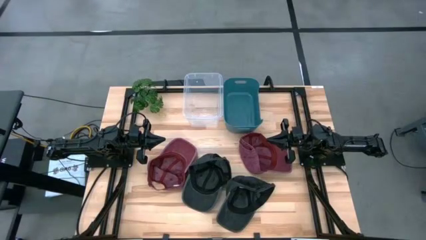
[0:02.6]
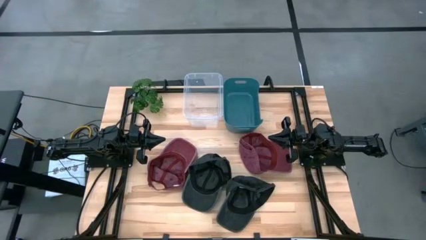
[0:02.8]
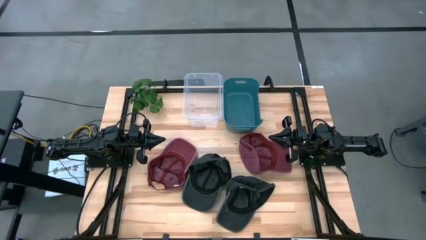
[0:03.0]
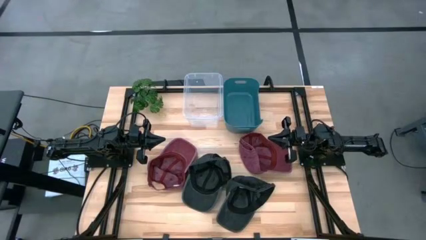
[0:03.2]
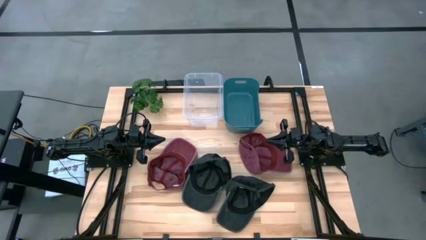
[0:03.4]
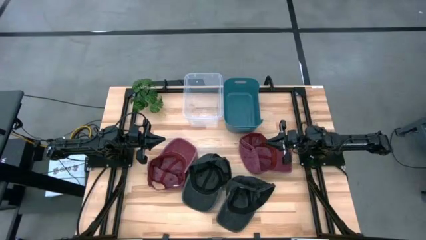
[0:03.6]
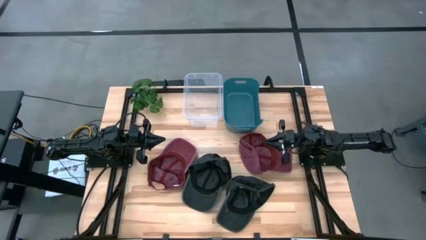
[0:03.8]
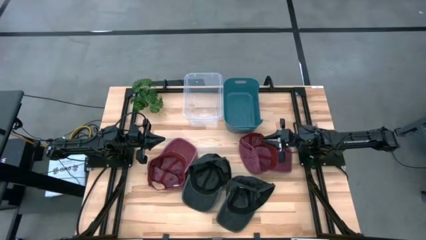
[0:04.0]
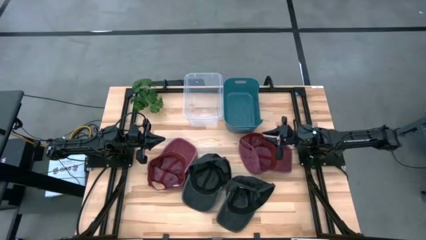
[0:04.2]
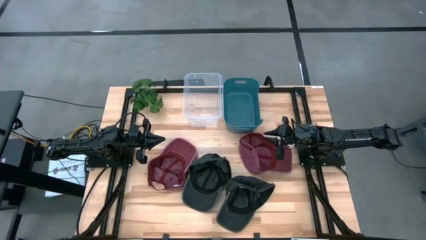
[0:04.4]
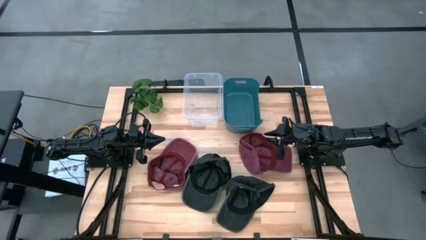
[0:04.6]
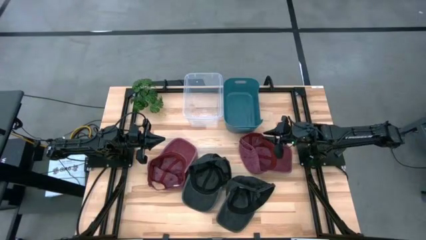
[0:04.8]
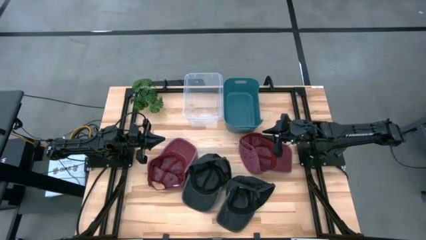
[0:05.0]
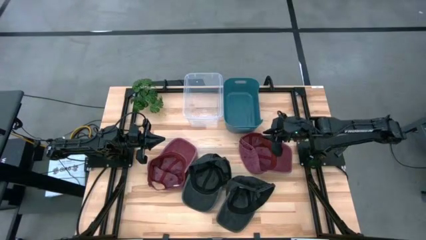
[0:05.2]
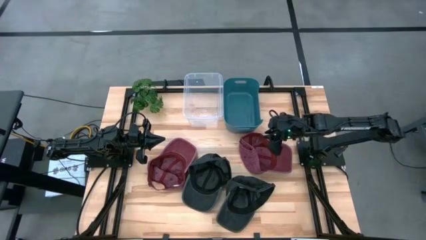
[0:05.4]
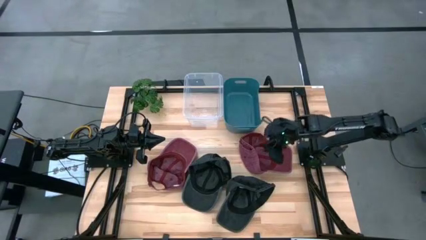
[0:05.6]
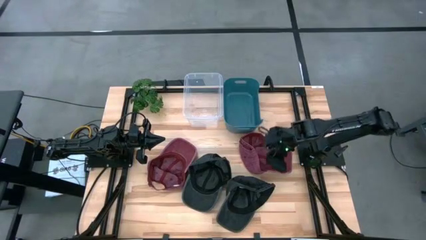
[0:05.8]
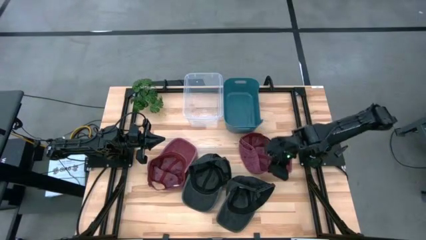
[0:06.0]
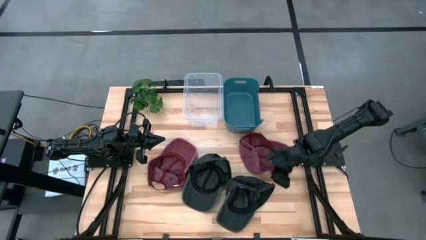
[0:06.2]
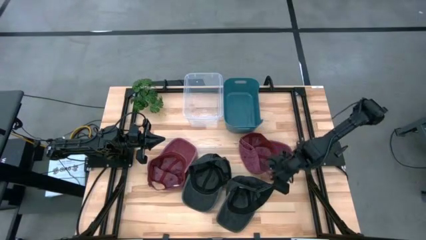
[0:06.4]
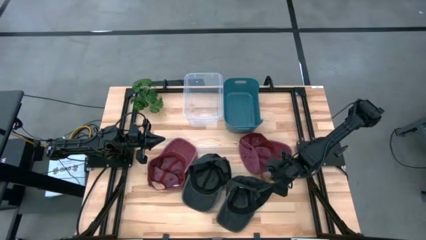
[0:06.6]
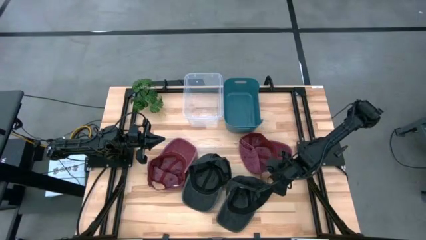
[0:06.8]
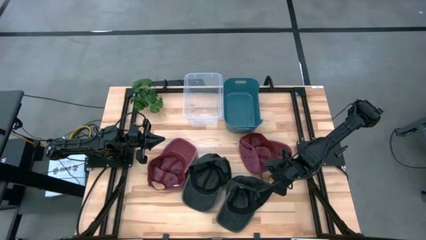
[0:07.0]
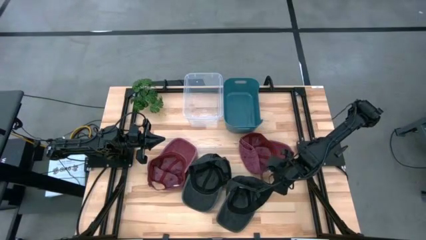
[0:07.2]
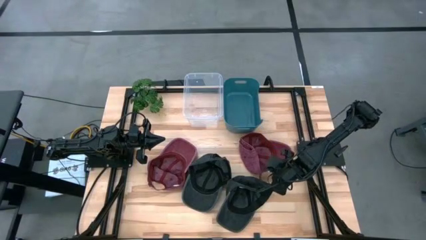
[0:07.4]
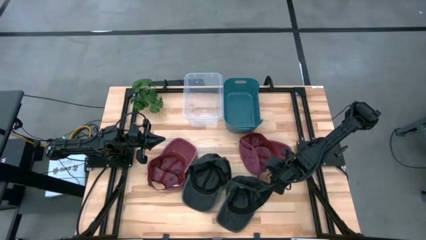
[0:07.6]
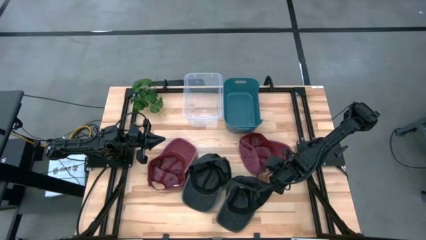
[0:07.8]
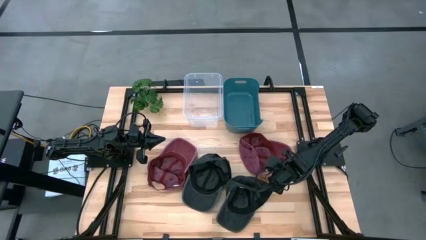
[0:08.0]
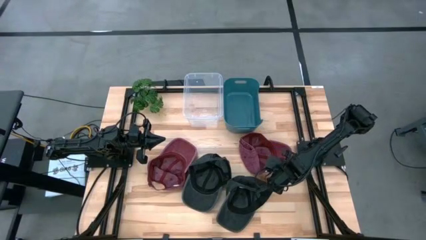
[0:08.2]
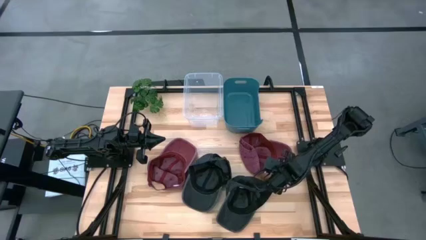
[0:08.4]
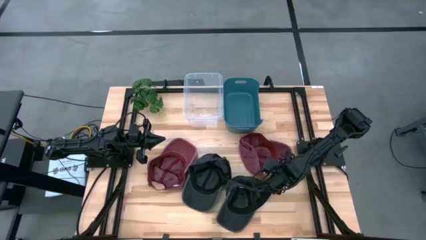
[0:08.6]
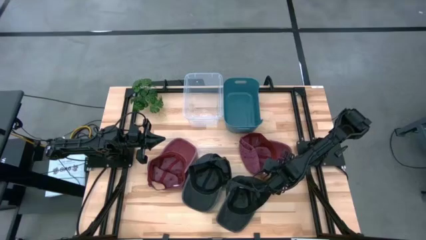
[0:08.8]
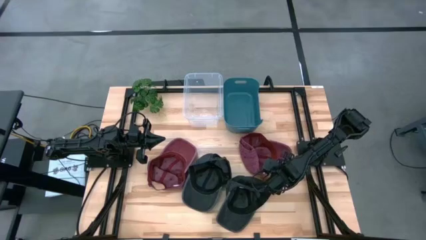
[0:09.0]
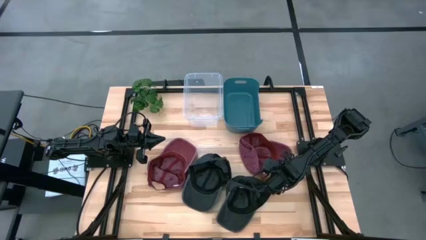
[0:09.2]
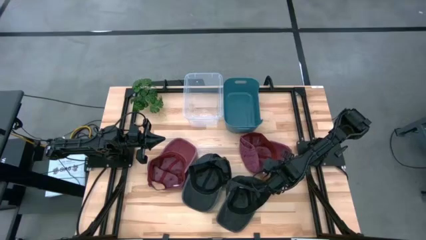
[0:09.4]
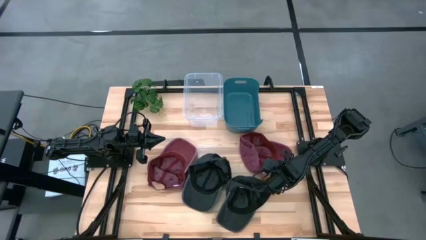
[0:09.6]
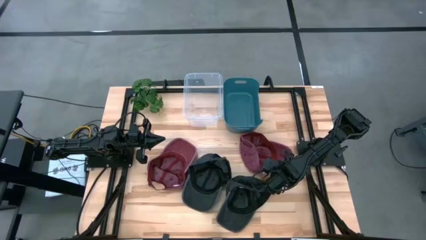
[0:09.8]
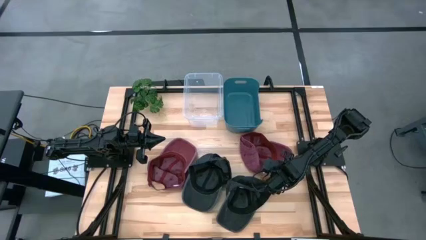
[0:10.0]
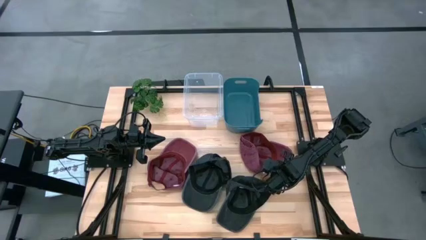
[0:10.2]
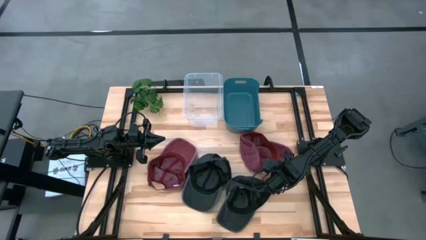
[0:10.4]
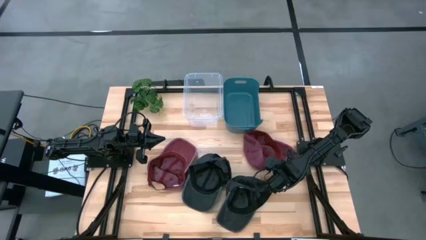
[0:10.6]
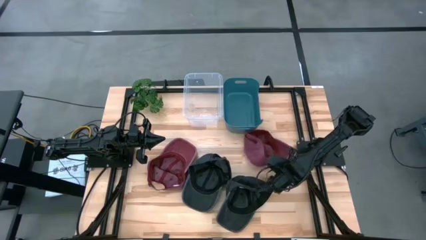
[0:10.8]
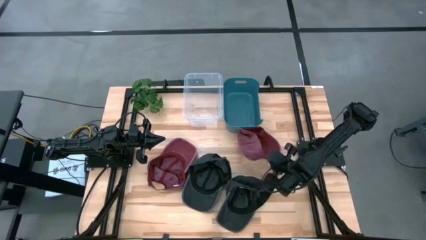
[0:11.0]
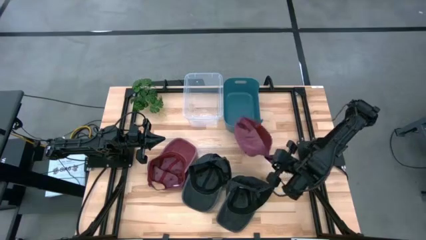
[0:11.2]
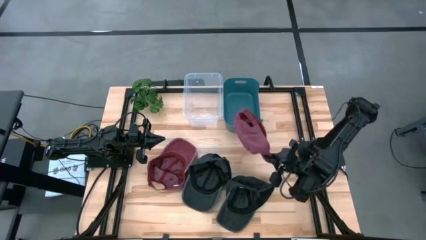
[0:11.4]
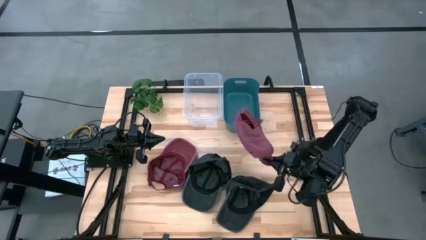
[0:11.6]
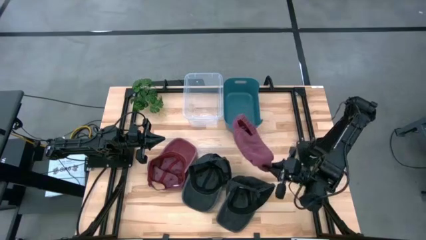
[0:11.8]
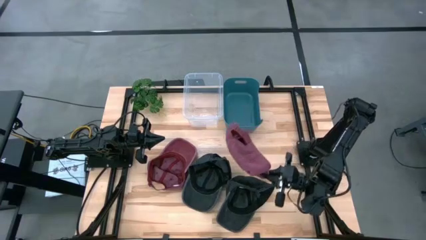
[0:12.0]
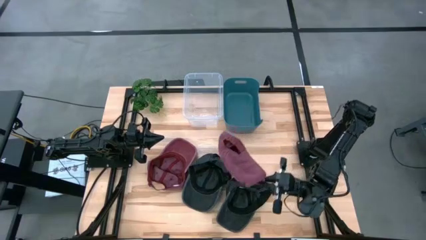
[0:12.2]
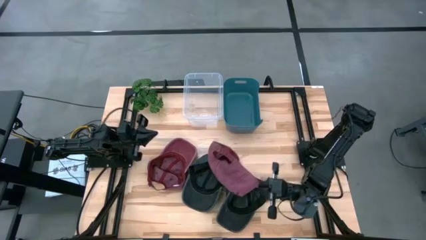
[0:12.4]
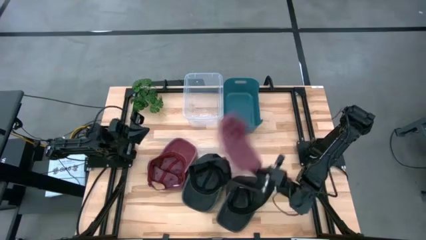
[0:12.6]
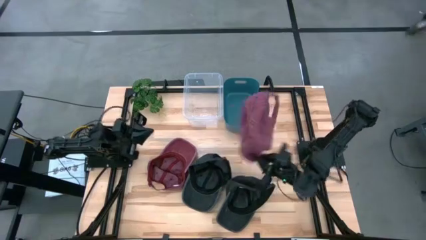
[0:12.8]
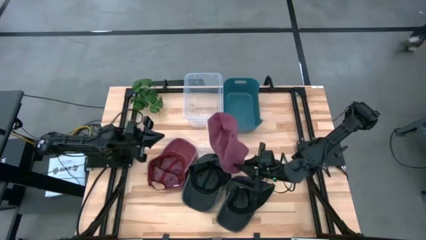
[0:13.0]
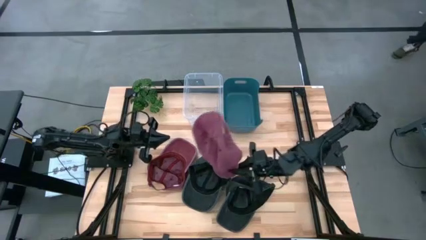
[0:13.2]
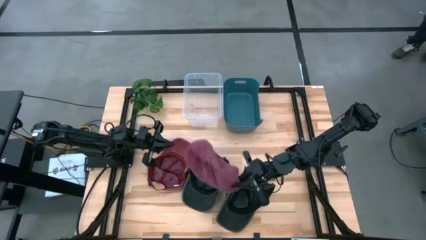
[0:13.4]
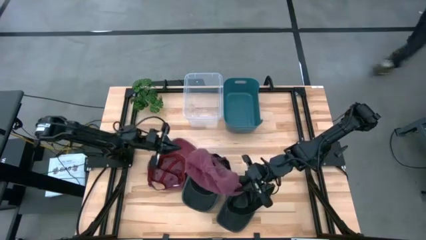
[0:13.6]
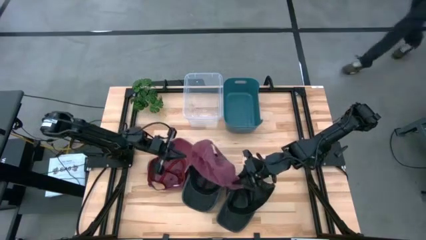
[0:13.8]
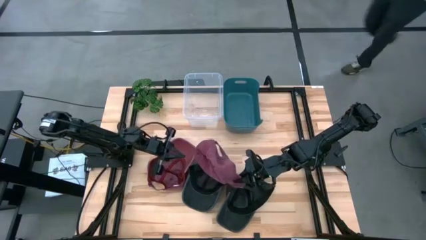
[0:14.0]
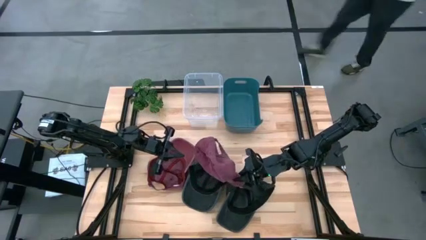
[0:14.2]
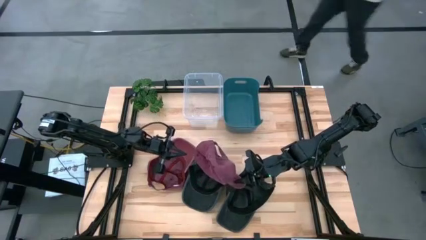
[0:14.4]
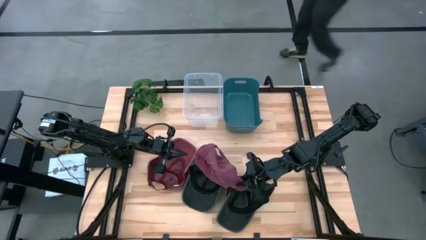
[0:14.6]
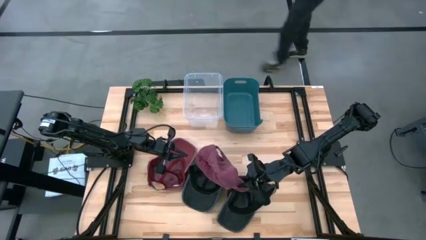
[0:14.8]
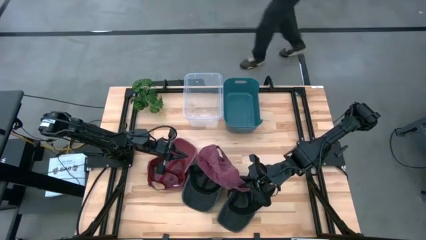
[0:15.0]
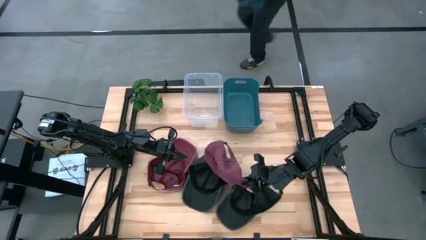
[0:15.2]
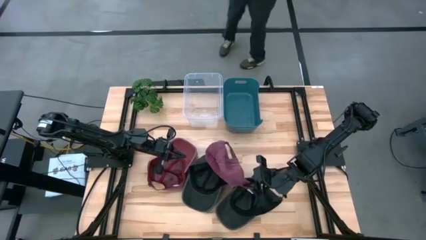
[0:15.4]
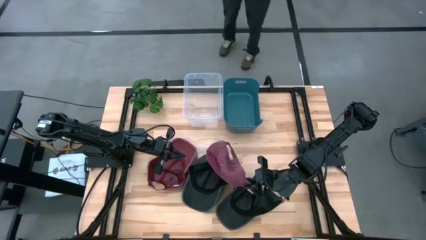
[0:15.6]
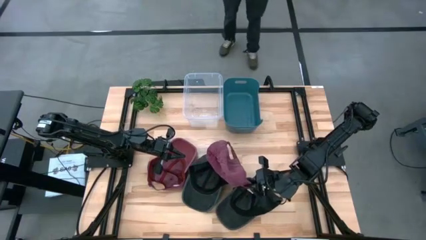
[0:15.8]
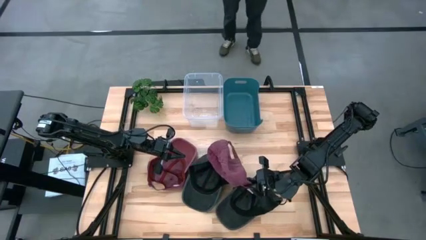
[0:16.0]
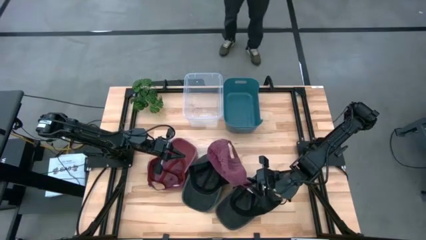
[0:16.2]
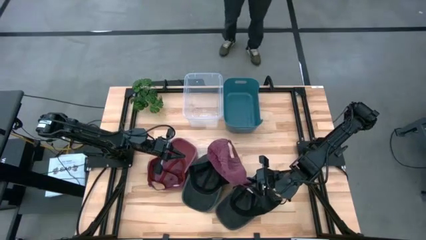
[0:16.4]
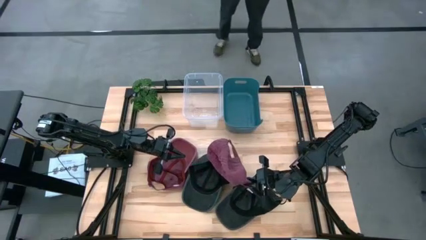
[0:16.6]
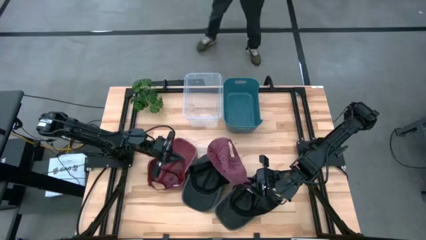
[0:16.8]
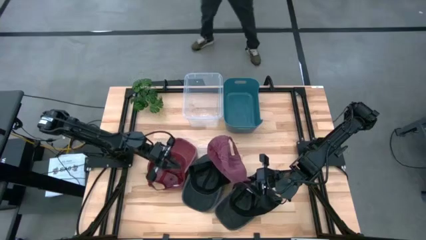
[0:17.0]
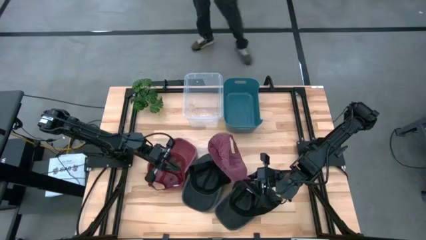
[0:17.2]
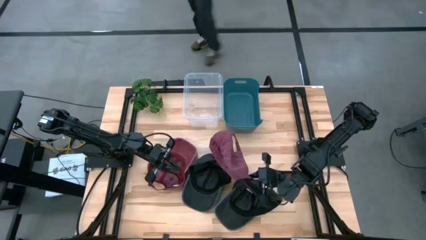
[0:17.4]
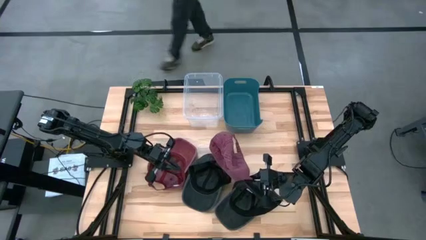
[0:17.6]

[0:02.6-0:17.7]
Task: Pick & Place hat
Put the right red cap into the blue bin
